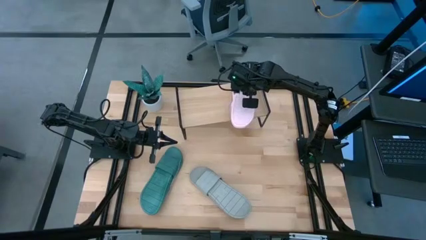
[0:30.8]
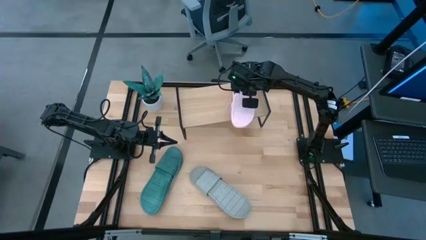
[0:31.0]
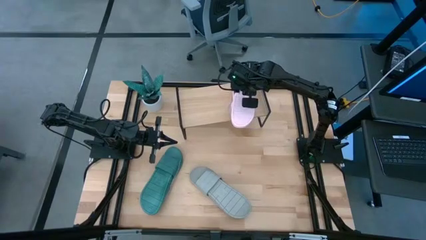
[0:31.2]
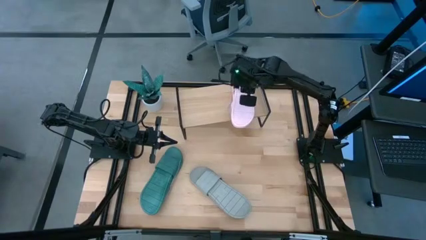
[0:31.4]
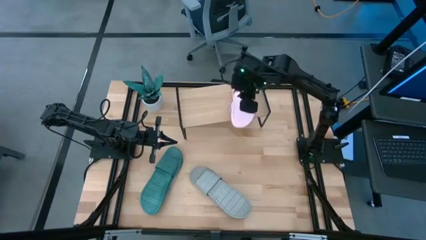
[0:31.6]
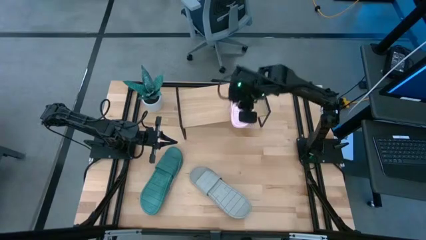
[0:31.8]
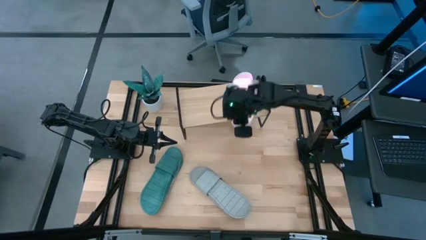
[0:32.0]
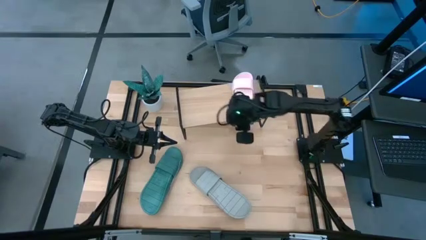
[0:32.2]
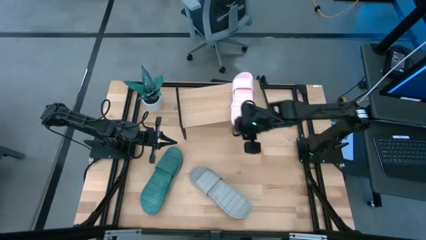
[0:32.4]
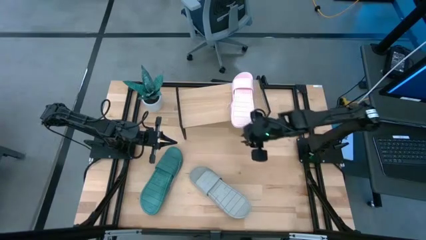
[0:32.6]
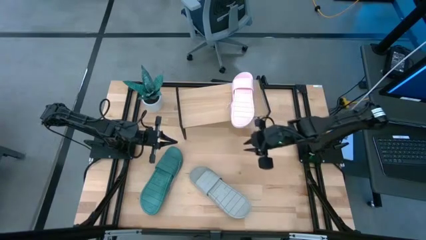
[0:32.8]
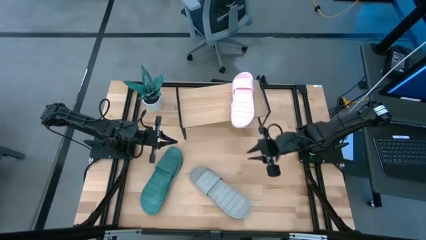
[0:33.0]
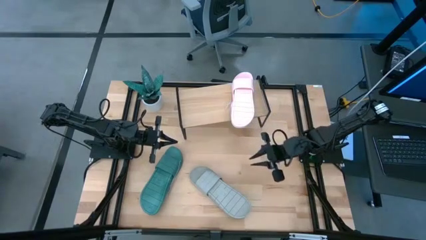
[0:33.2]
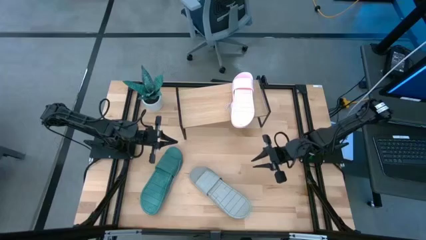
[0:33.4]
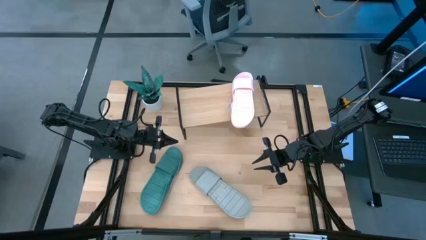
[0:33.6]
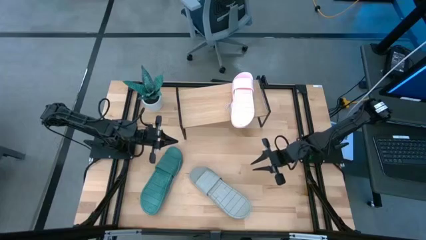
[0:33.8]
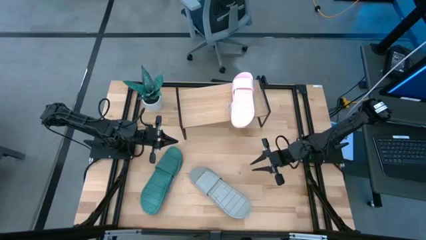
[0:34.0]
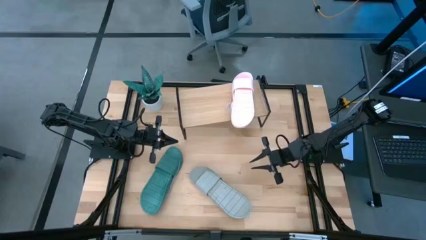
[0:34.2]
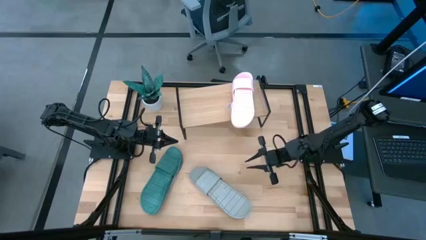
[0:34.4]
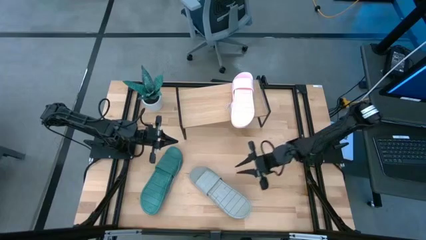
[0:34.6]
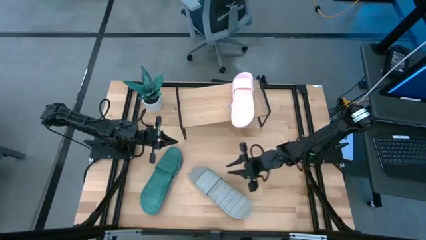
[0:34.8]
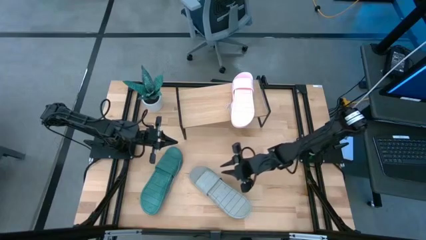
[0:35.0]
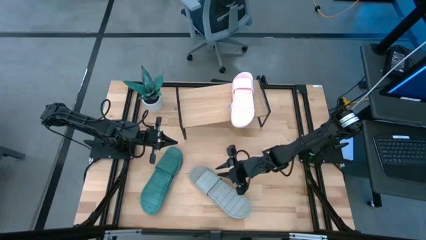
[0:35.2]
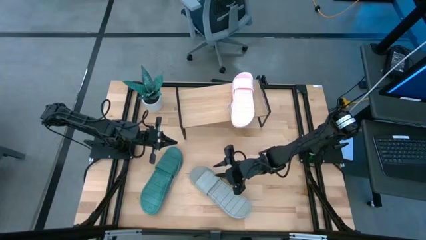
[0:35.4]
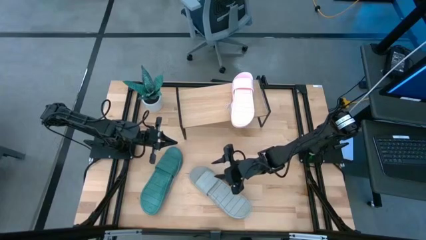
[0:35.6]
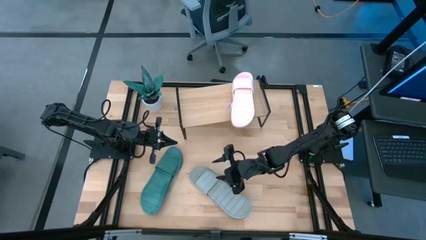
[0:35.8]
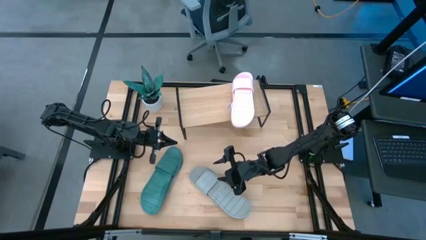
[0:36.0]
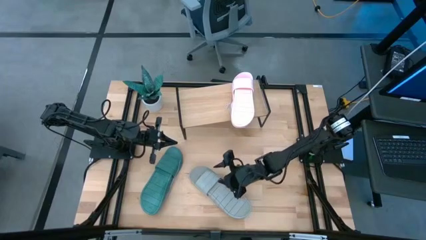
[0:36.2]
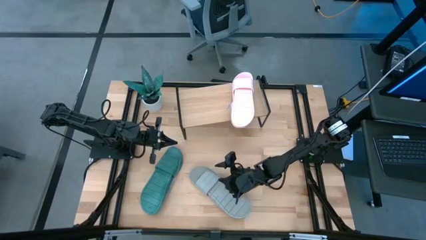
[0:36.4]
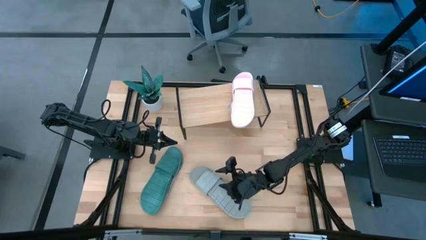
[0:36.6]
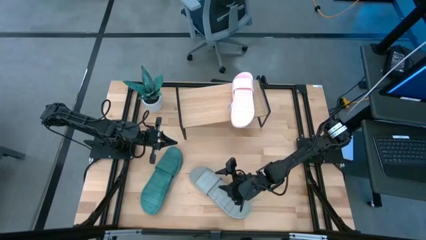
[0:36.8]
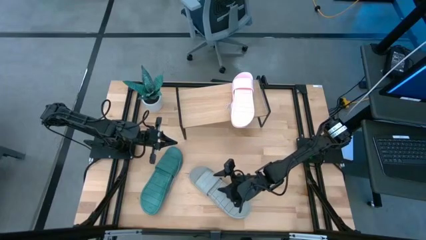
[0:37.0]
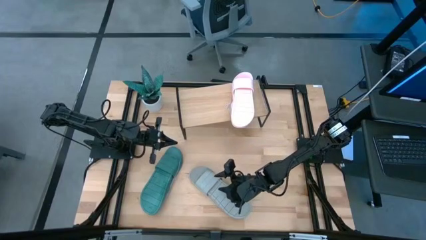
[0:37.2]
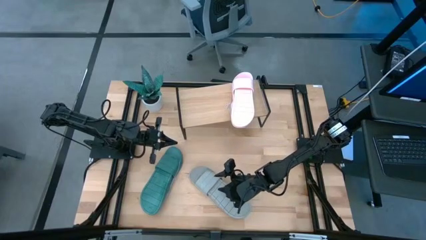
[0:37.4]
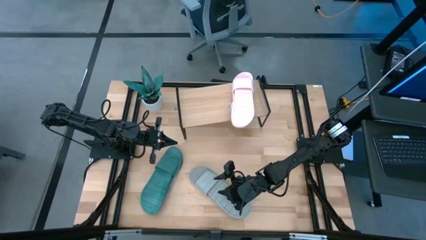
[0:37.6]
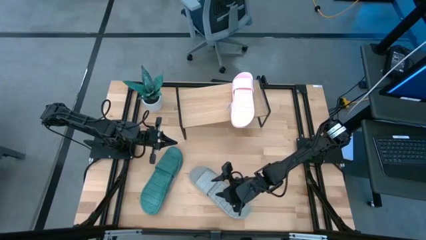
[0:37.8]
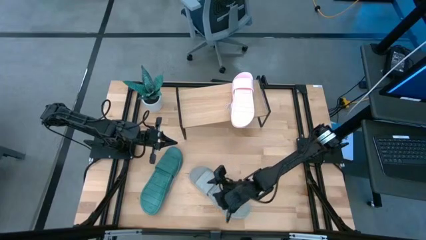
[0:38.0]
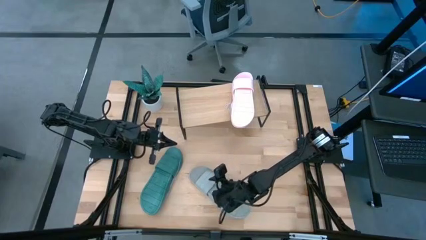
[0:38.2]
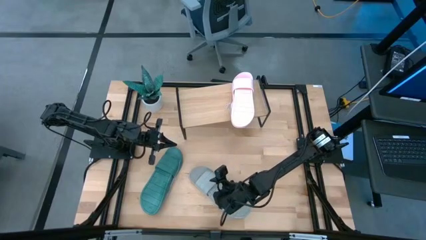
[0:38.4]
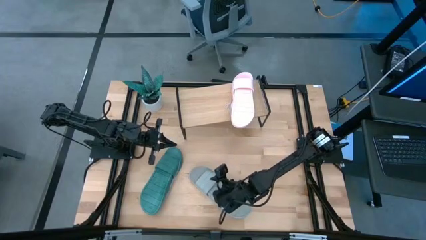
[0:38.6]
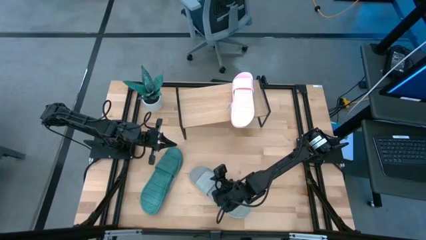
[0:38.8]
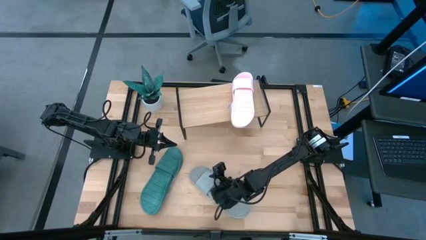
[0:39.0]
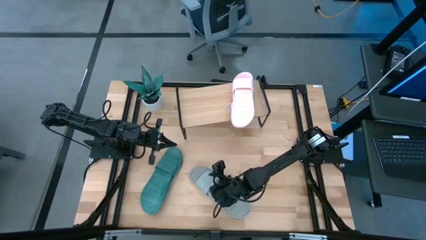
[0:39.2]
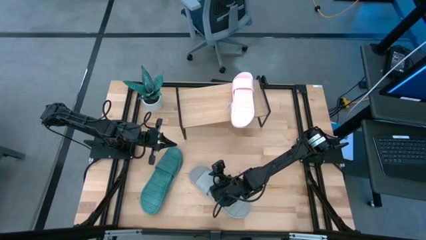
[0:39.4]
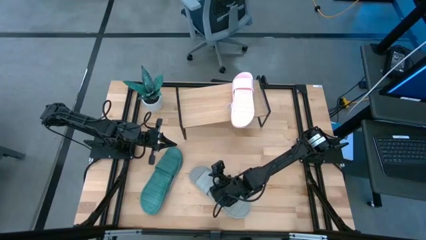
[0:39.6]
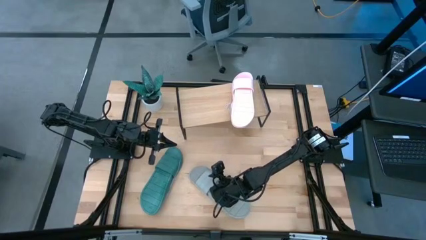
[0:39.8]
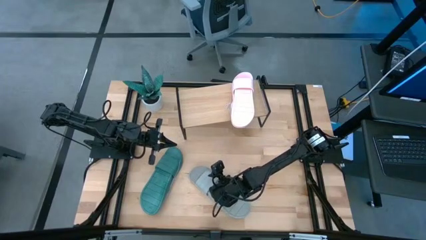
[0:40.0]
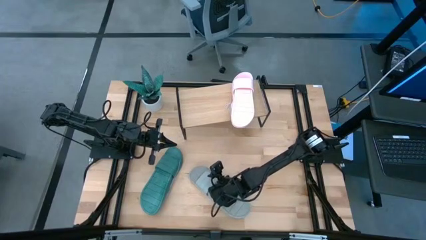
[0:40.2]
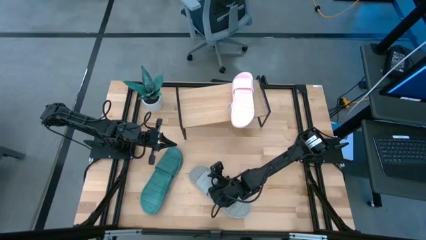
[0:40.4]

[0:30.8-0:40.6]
Task: Pick and place slides into the shelf
Put the gray pair of slides on the shelf
